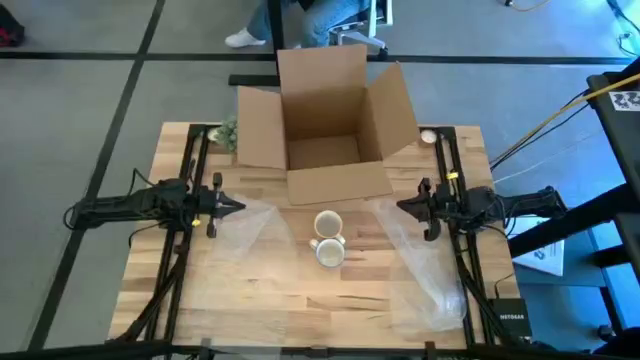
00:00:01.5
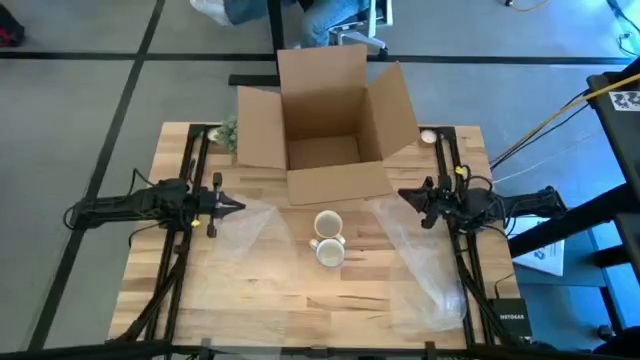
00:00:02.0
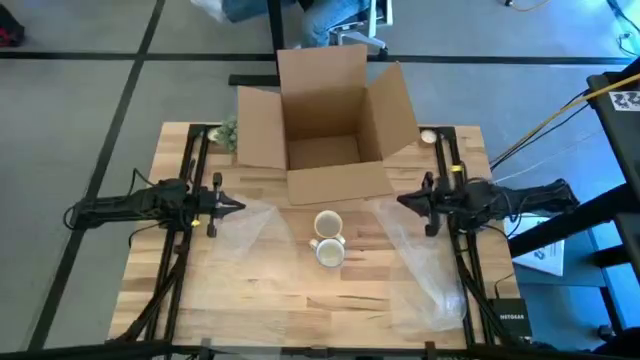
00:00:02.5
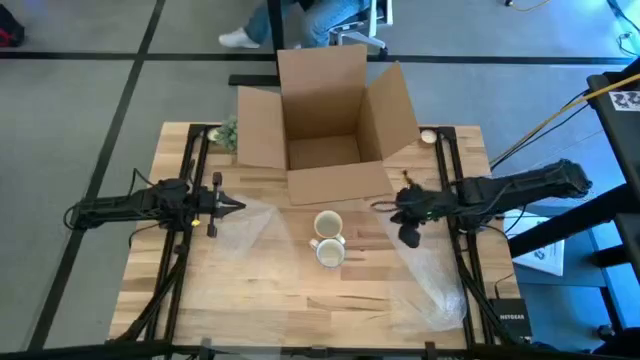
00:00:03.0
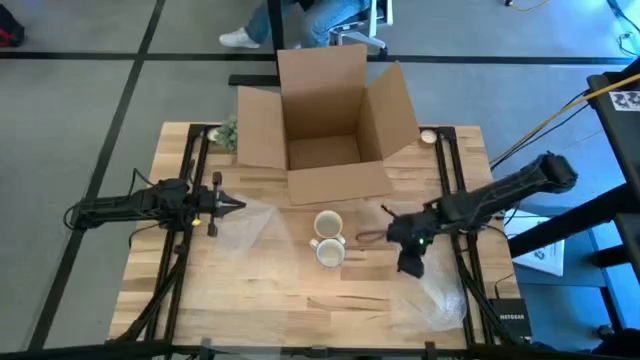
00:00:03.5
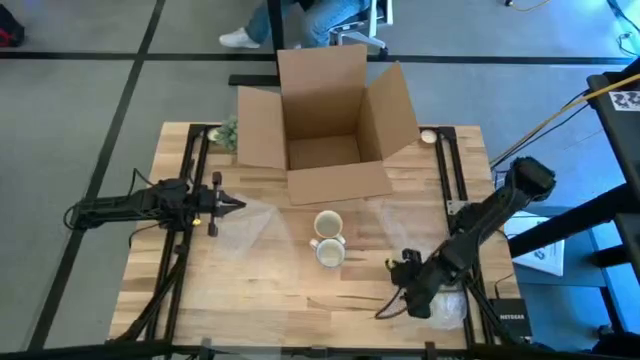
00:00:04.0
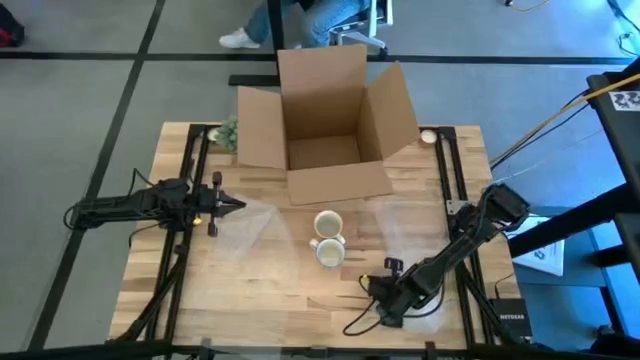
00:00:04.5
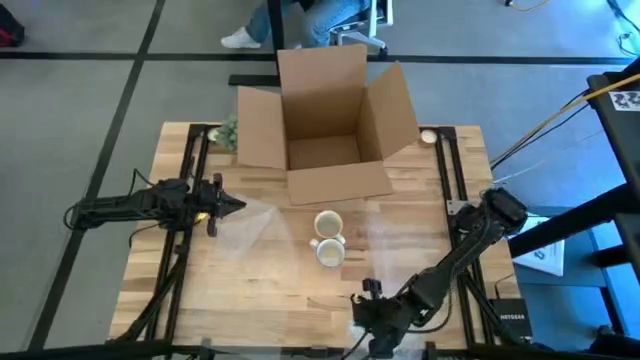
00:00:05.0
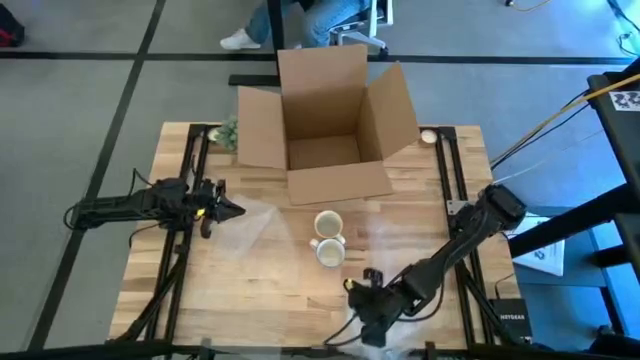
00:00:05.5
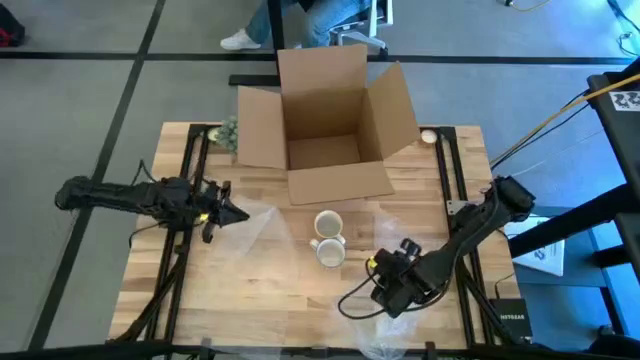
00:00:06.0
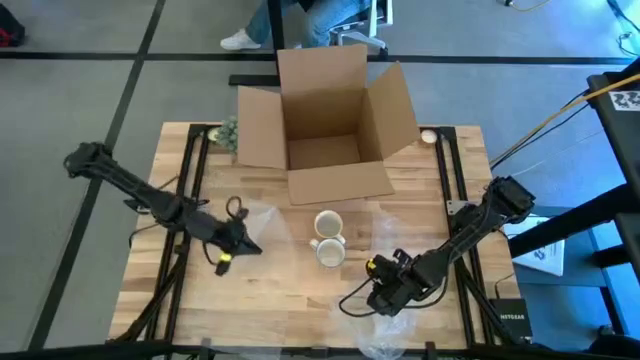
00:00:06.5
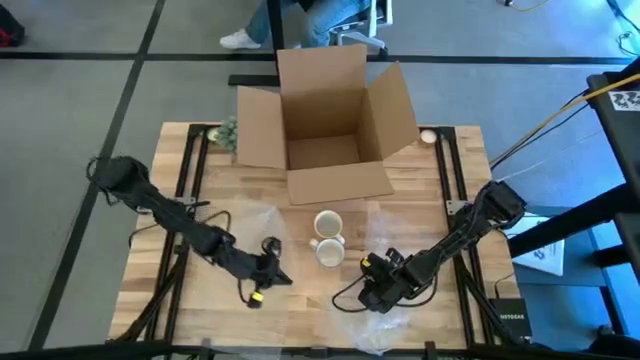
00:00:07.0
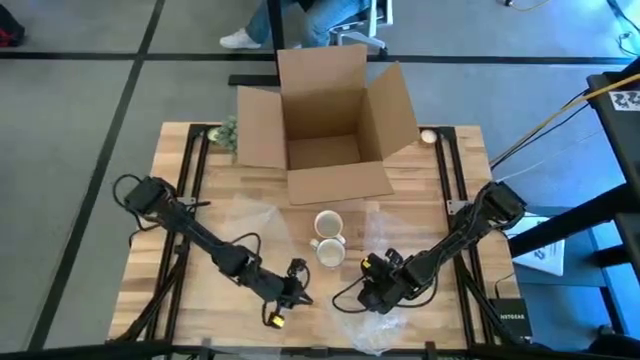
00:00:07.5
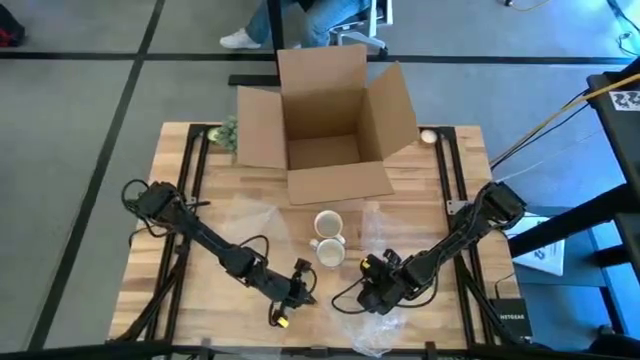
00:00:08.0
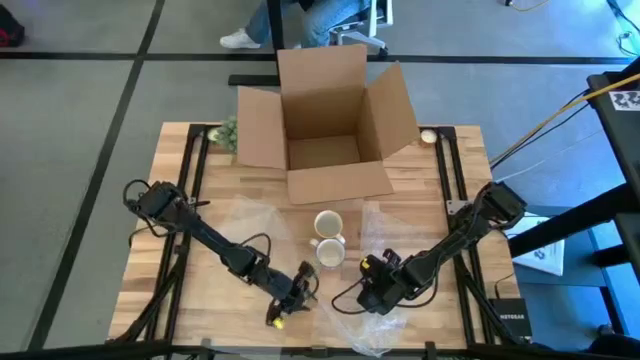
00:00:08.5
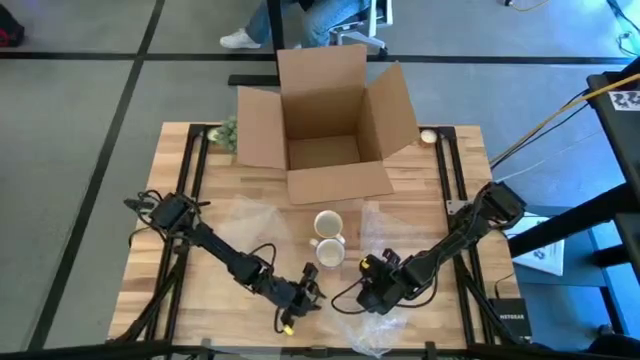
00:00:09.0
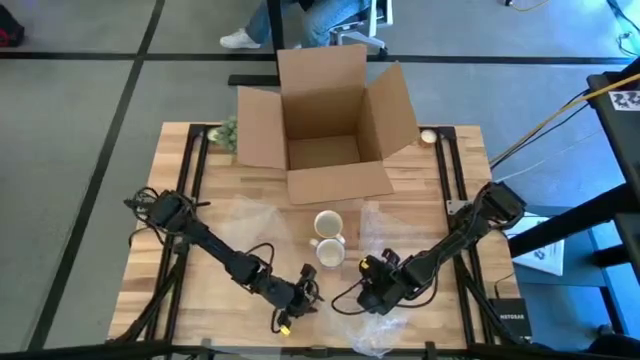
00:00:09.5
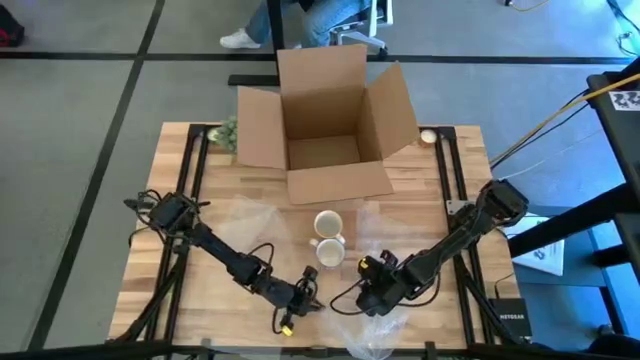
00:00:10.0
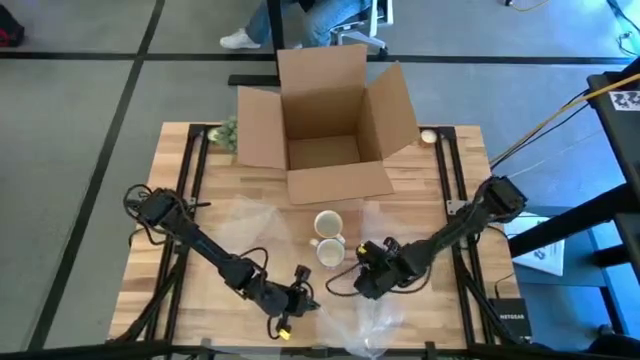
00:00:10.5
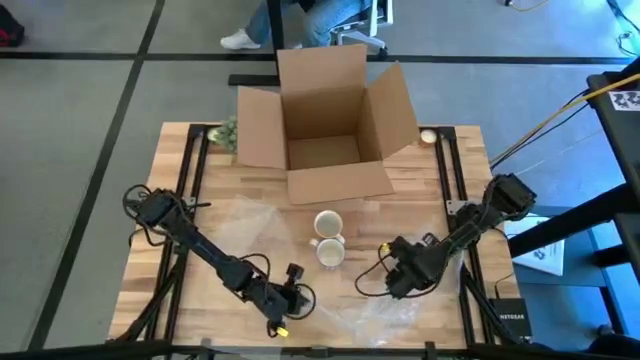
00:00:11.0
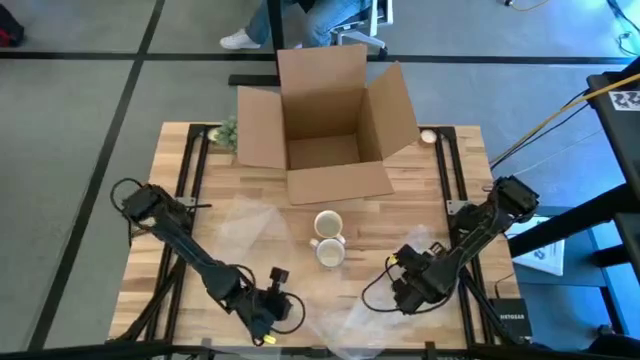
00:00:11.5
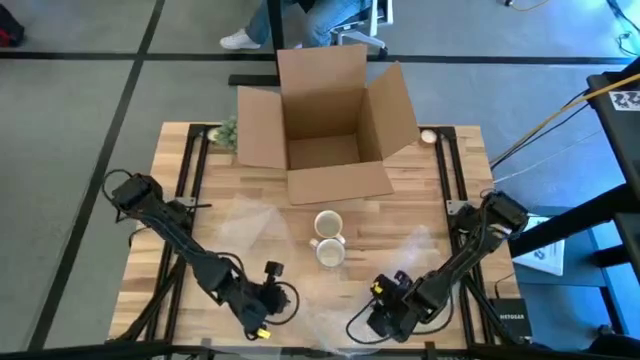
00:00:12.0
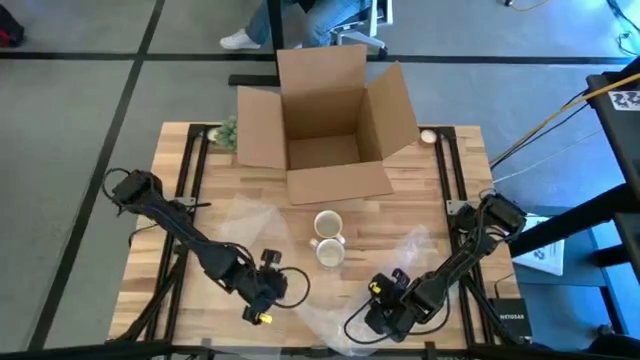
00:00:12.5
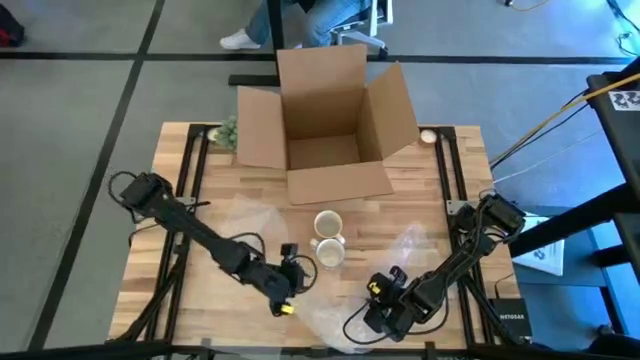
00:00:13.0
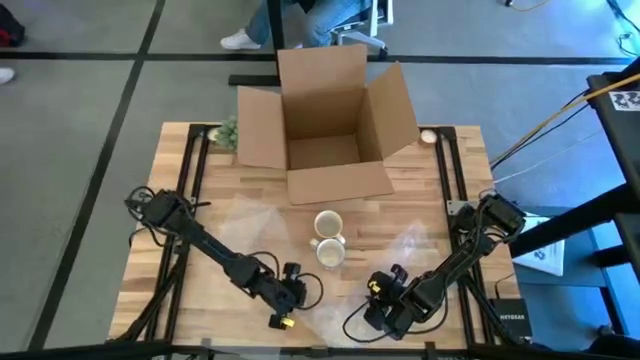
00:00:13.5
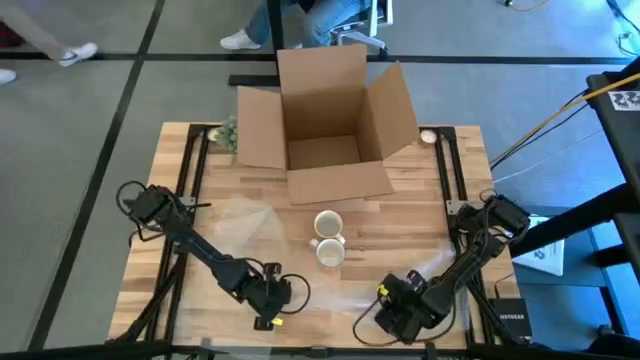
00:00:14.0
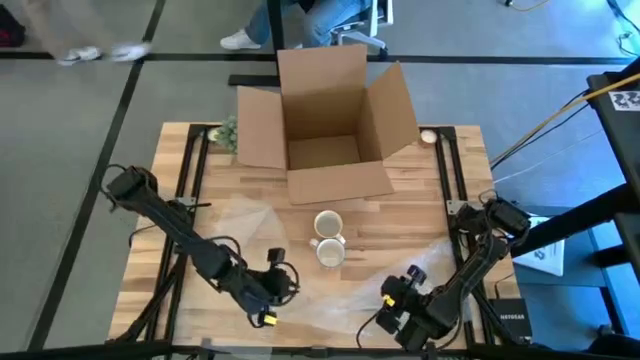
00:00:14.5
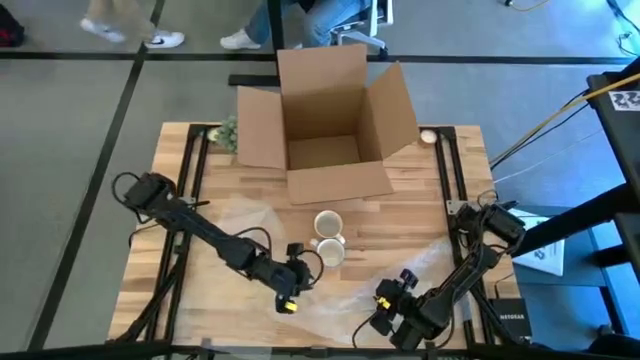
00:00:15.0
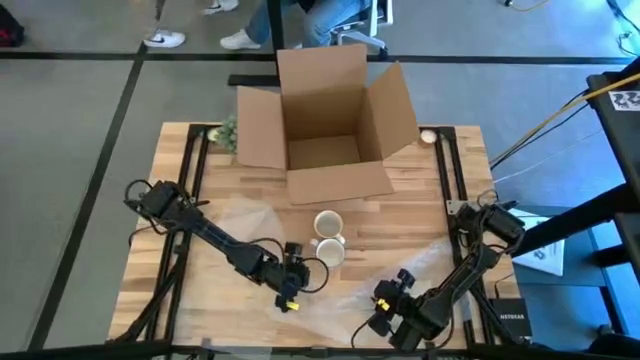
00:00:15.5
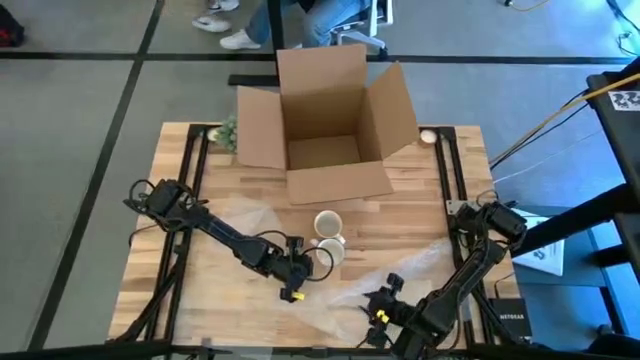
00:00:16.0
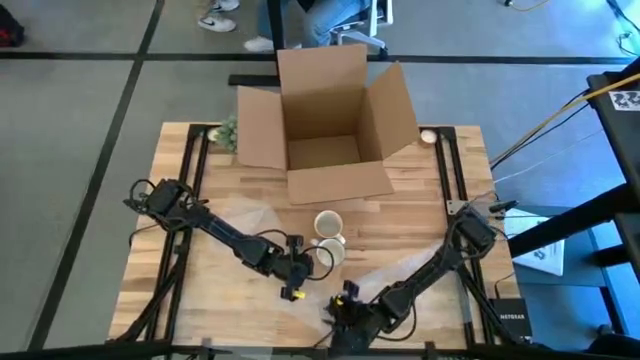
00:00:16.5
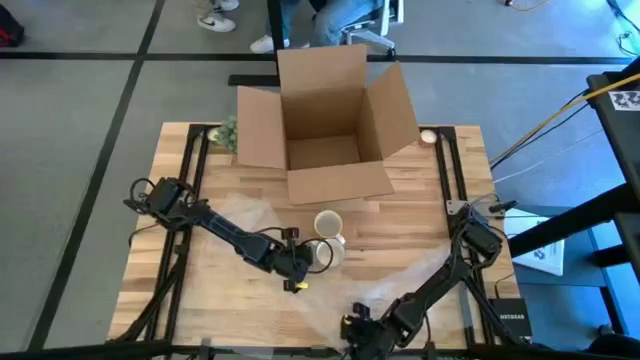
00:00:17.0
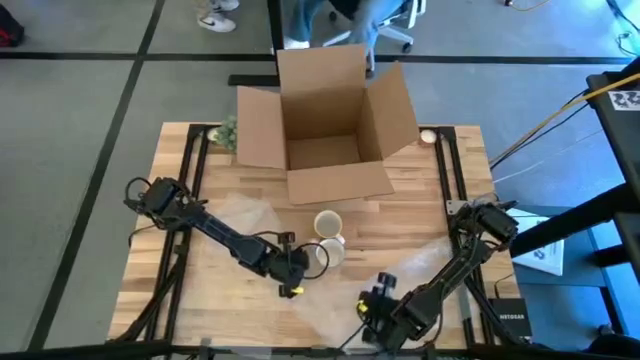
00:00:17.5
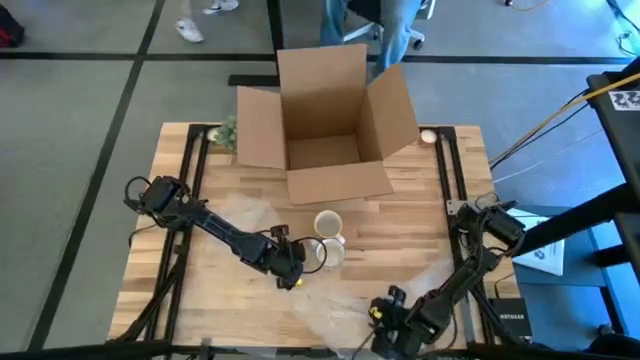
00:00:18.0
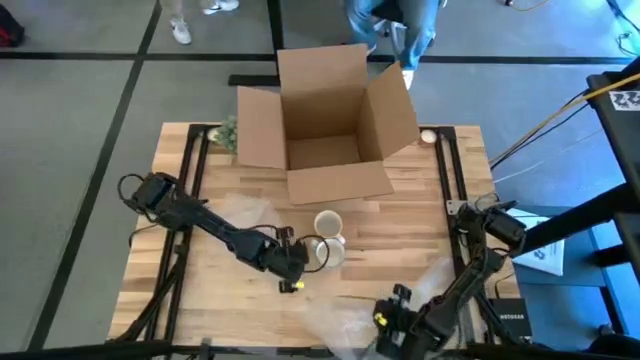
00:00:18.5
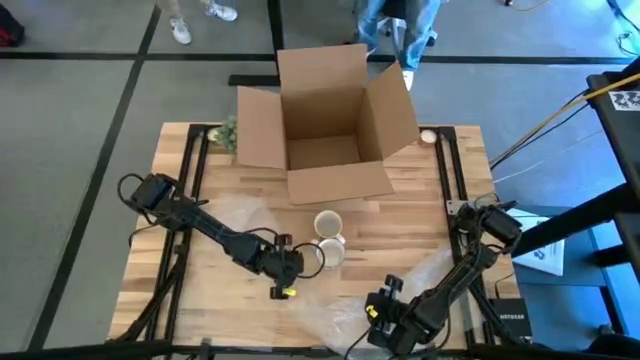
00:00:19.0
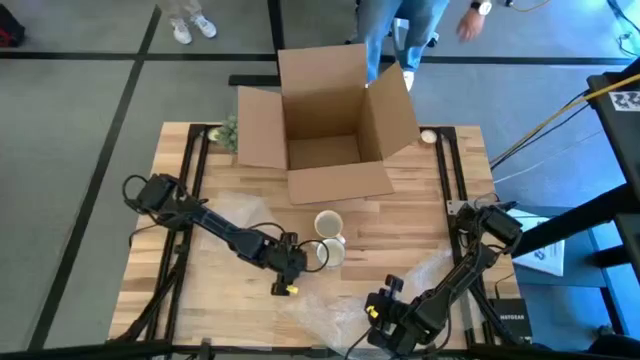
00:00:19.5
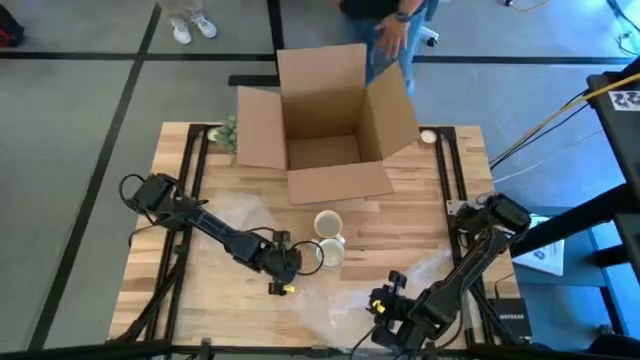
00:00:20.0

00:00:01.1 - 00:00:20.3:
Task: wrap mug
Wrap the red mug with transparent bubble wrap
